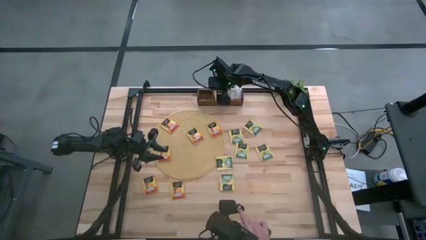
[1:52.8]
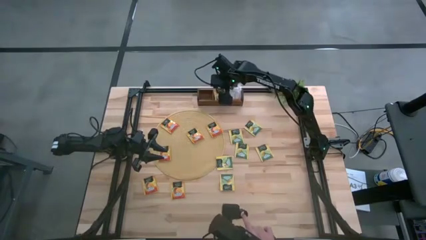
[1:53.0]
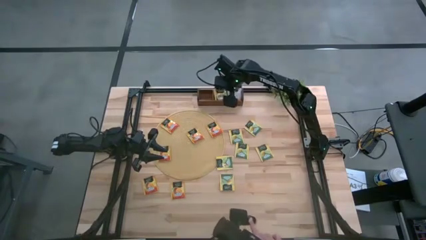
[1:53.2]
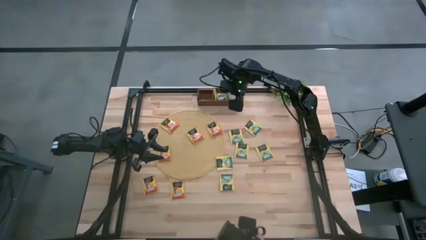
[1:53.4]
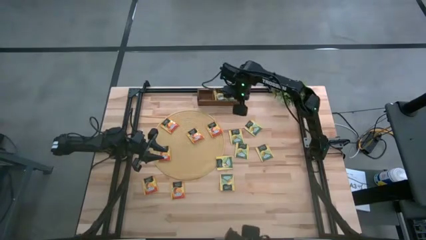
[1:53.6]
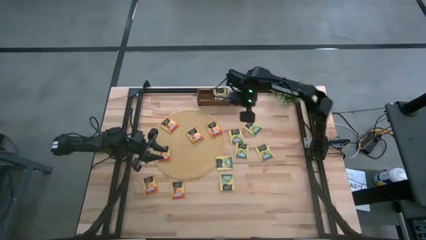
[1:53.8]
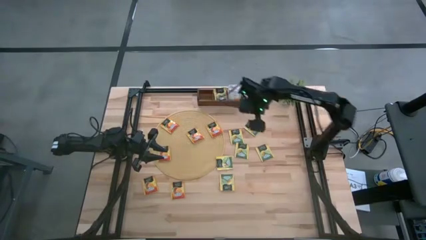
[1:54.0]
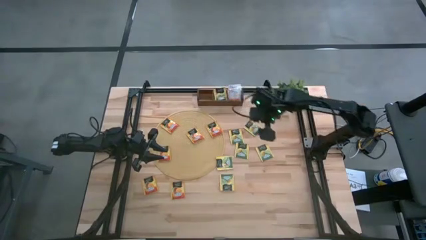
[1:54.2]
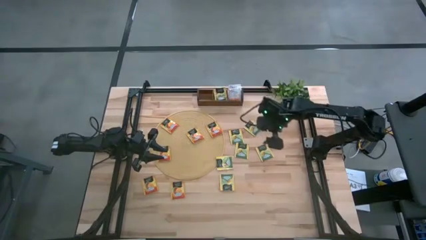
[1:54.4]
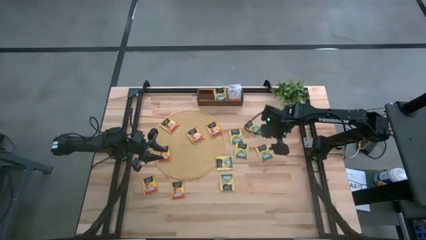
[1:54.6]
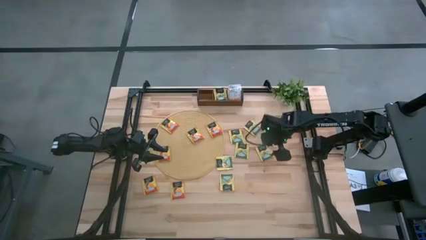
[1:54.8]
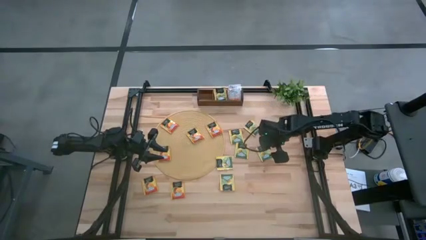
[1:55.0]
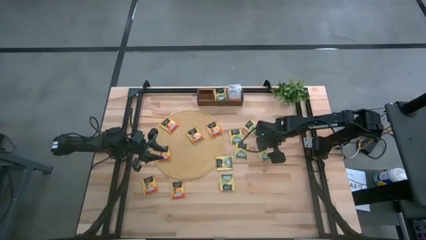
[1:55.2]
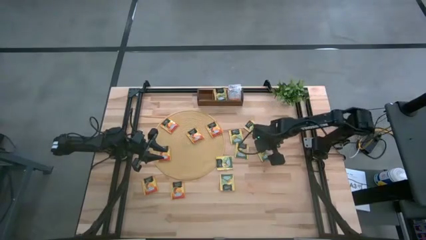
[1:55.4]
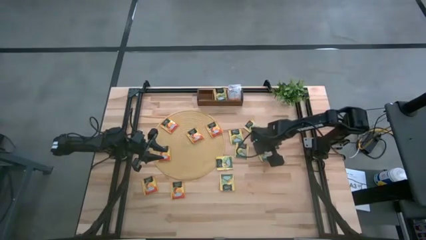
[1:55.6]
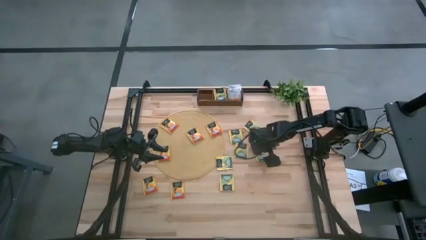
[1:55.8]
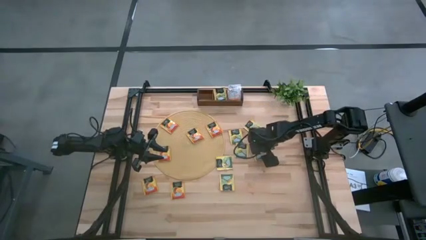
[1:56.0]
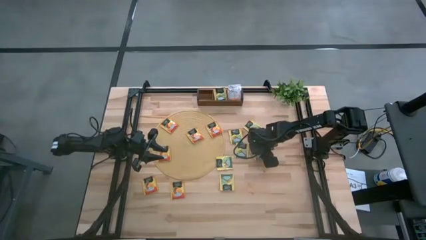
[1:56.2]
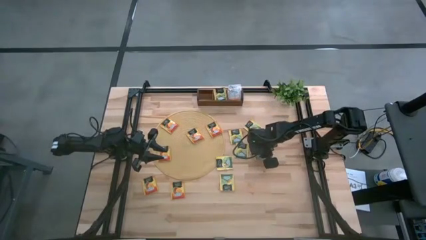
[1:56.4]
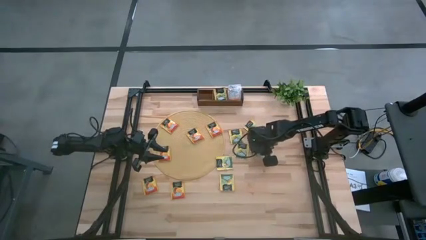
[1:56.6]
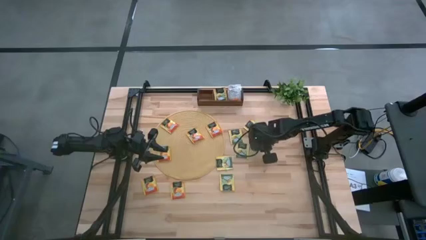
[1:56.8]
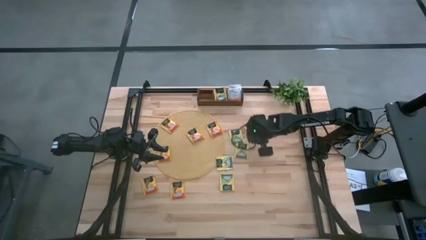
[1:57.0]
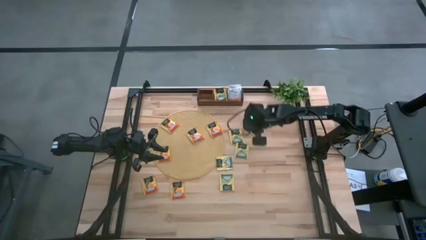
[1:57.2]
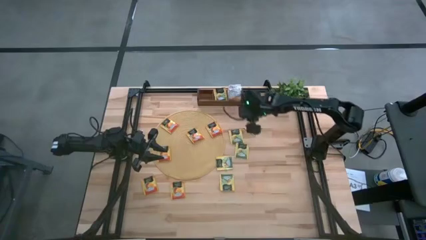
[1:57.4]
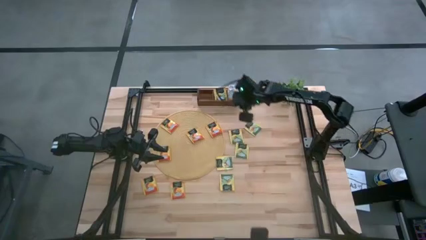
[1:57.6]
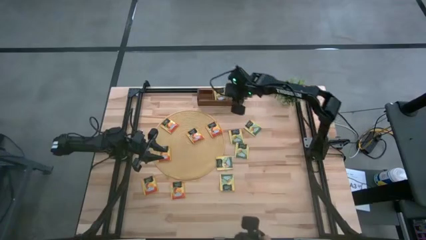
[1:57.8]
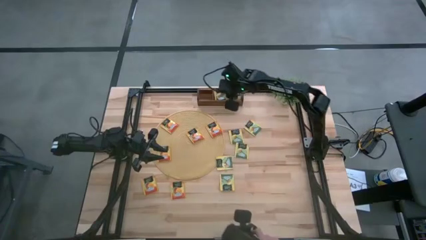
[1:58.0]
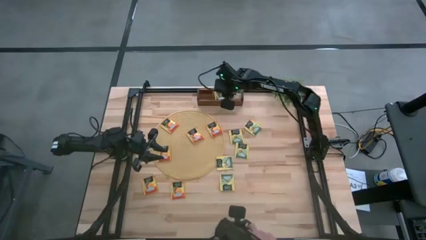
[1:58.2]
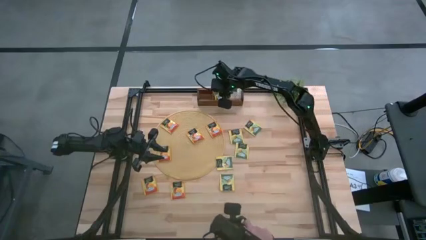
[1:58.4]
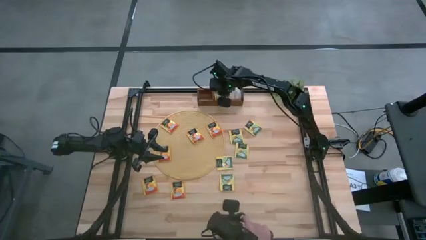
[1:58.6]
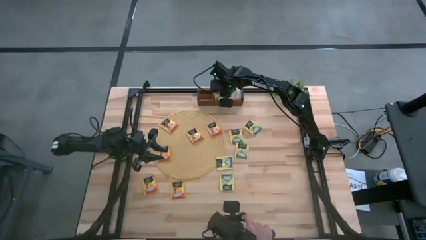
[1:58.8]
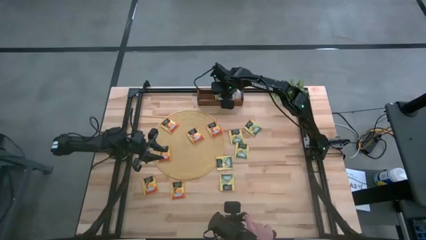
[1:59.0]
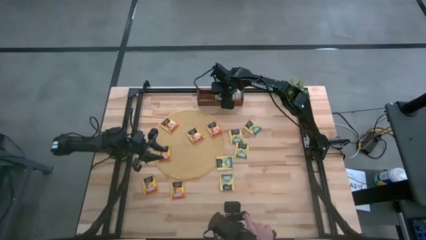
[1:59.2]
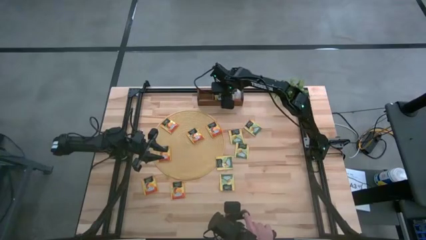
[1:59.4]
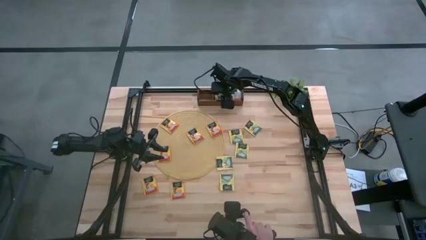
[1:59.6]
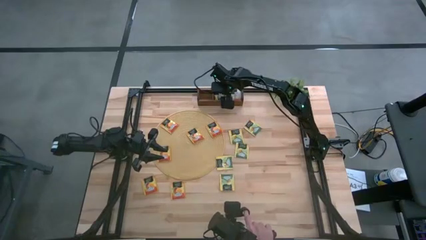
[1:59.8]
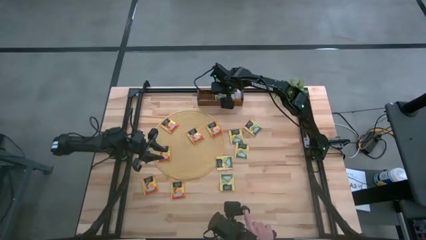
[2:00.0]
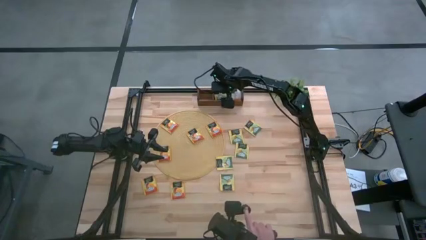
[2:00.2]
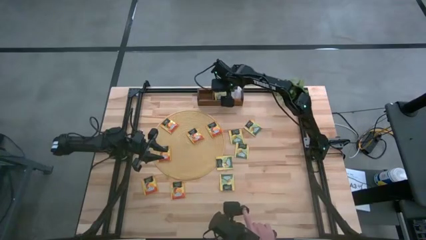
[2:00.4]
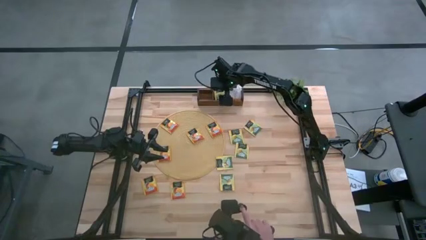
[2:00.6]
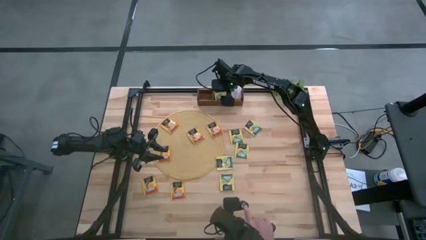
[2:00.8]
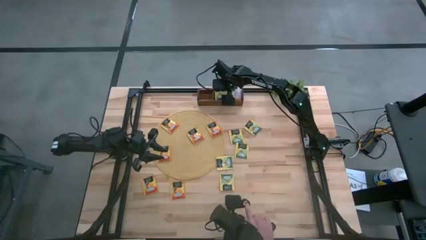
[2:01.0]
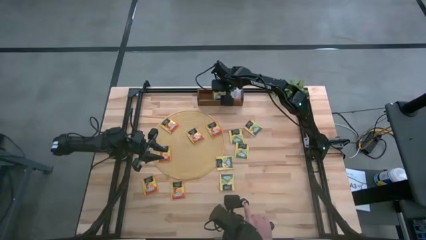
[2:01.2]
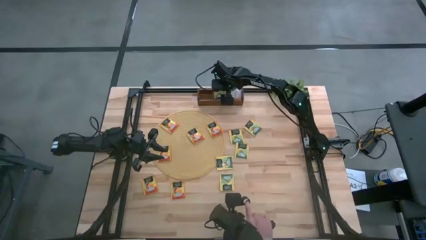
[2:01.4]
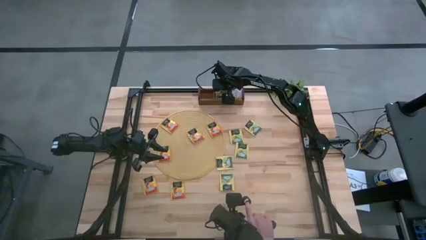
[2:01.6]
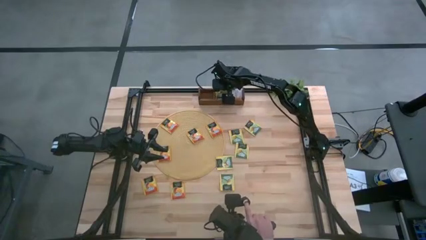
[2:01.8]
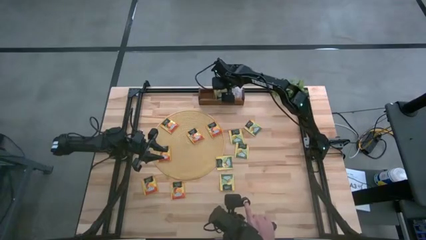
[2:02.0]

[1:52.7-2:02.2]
Task: Pick & Place Tea
Put the yellow tea bag into the middle section of the wooden organizer

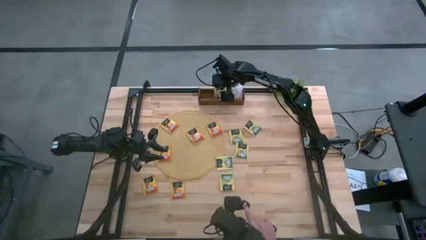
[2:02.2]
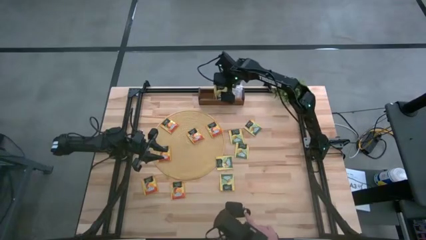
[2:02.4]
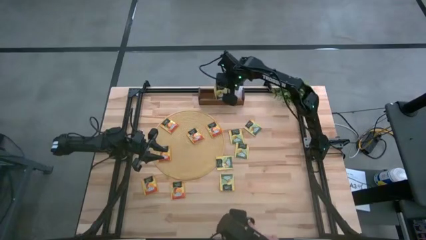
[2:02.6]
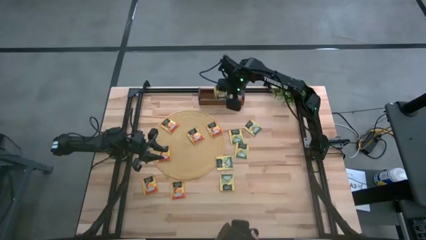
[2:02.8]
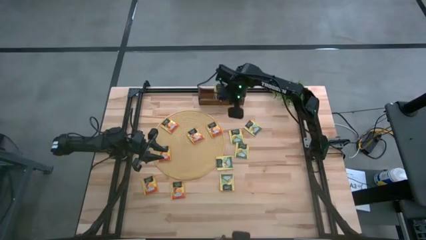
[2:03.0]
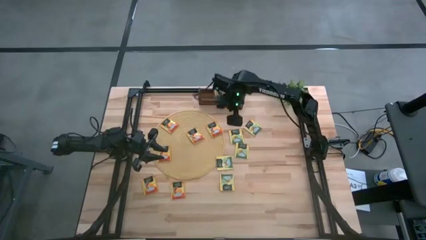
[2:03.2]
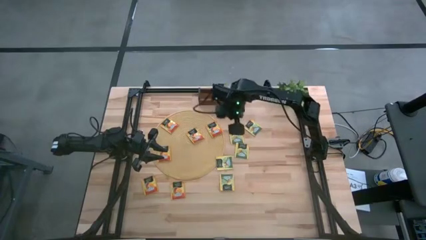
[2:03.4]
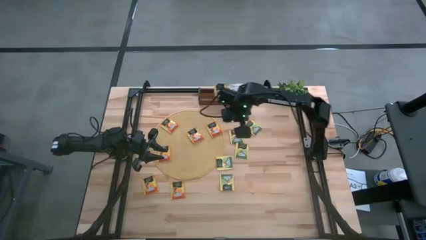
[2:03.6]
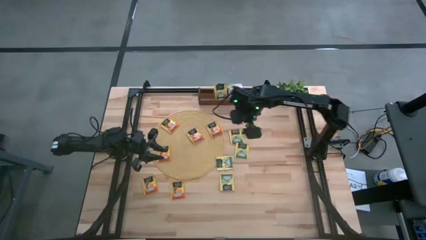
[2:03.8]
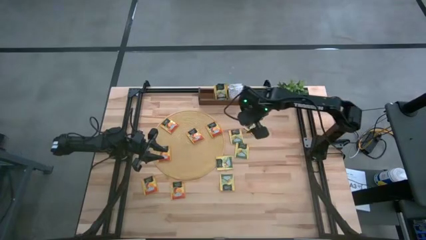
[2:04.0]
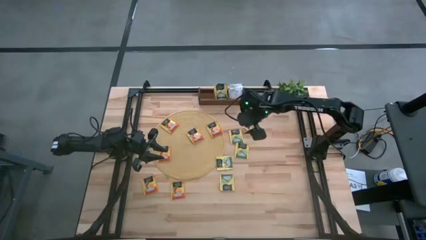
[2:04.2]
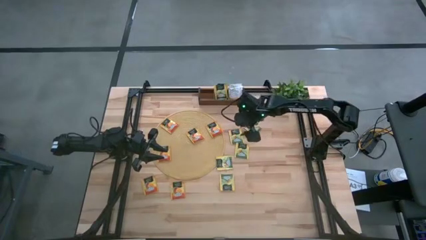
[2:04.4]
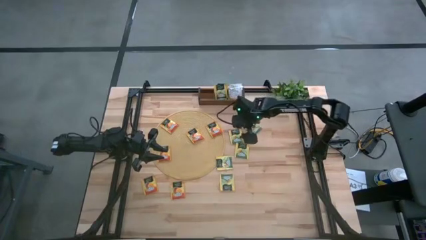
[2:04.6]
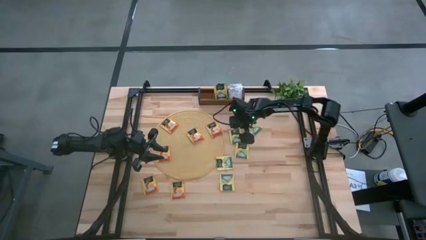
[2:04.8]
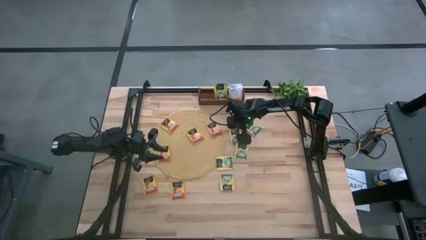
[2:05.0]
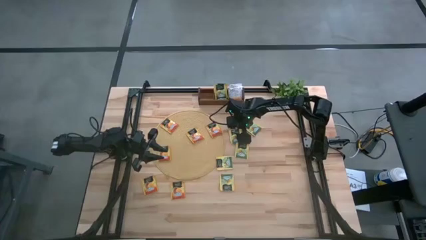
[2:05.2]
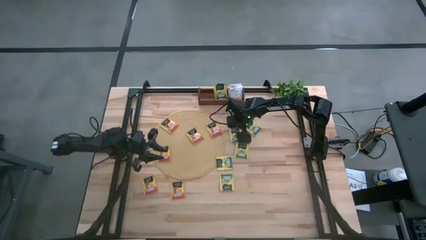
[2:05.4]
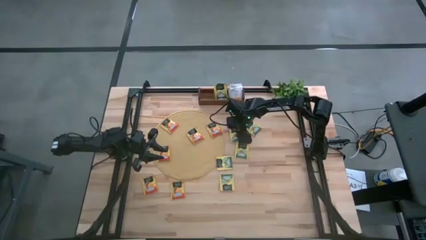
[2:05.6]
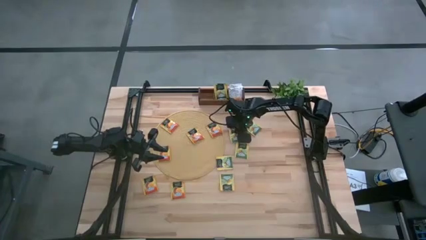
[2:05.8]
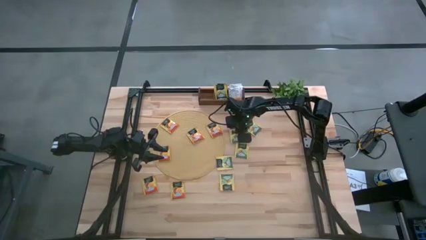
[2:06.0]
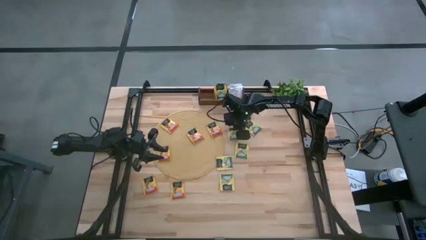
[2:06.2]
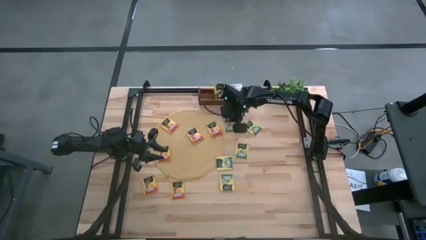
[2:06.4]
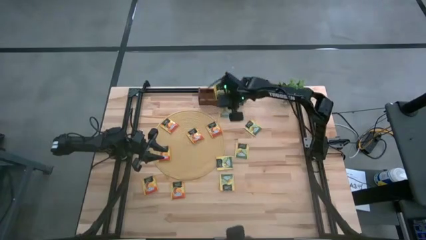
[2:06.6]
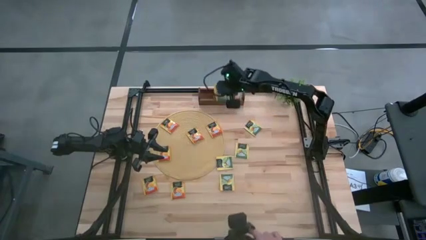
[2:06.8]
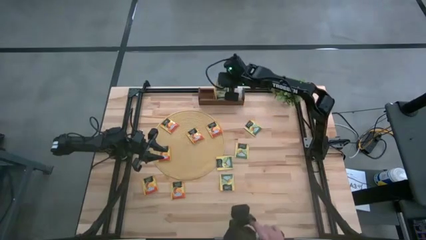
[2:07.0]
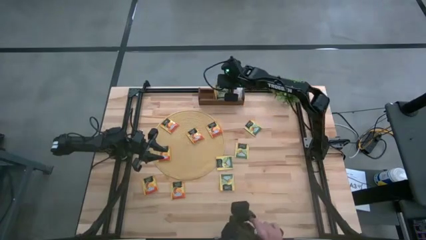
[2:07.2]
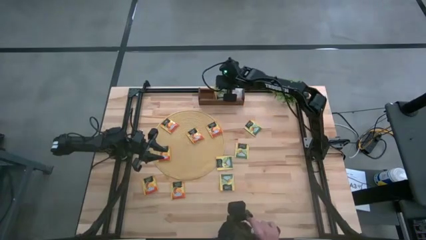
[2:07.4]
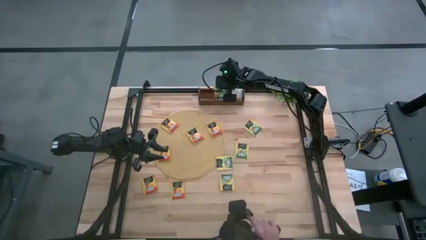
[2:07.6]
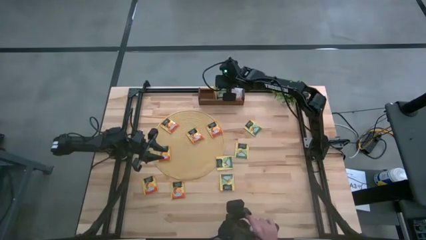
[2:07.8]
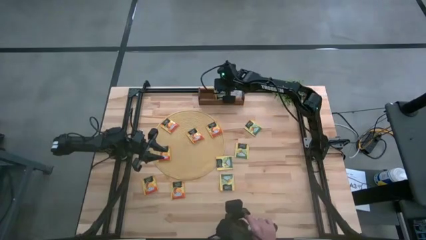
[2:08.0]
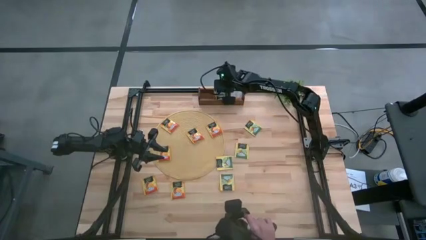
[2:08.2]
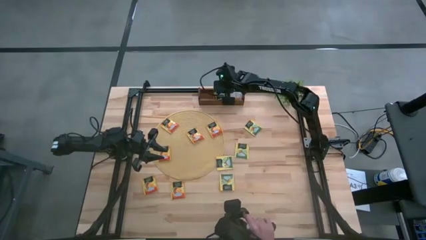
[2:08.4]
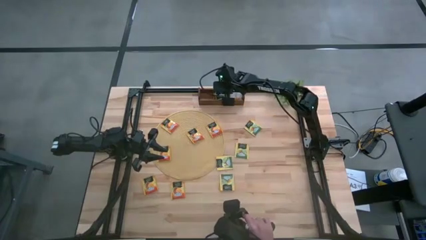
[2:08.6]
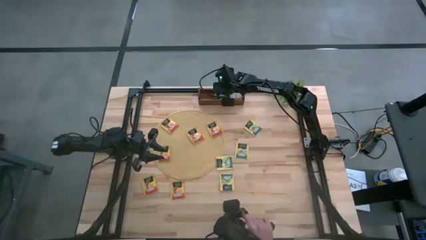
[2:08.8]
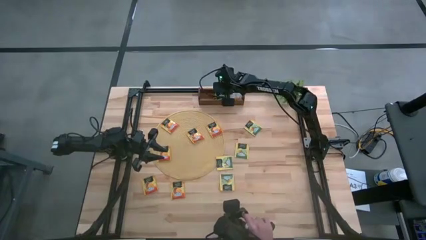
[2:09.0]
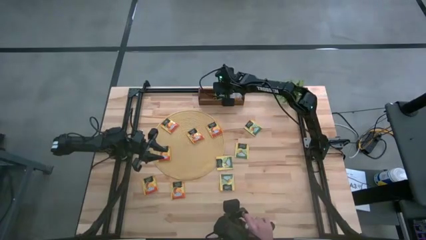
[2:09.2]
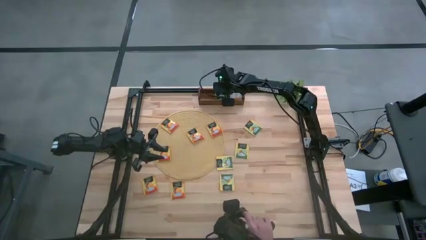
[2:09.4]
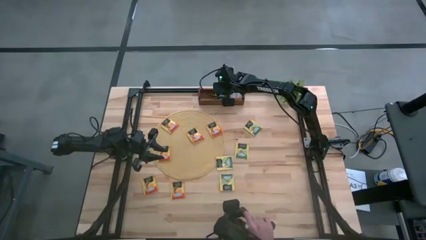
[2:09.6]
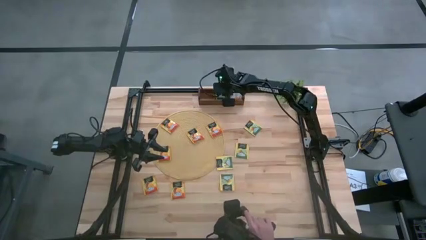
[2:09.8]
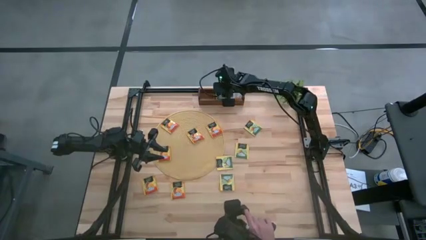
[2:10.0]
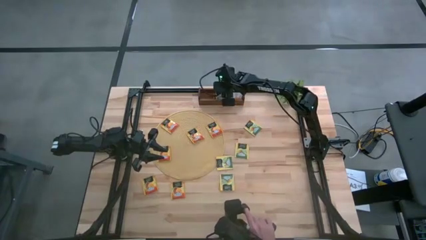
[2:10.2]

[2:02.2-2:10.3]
Put the yellow tea bag into the middle section of the wooden organizer

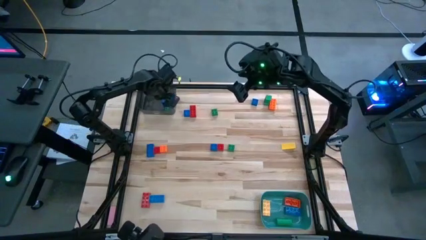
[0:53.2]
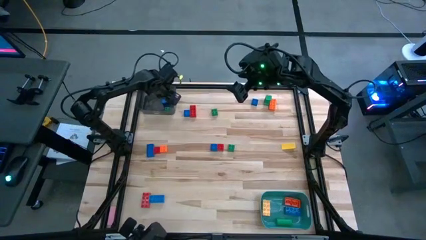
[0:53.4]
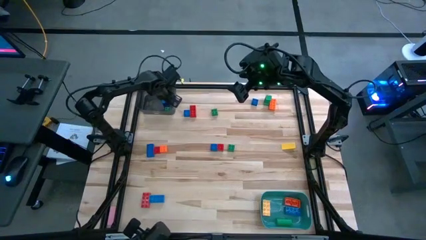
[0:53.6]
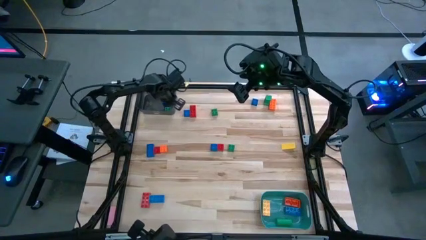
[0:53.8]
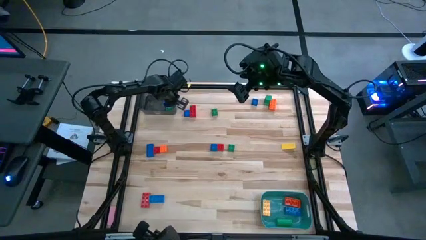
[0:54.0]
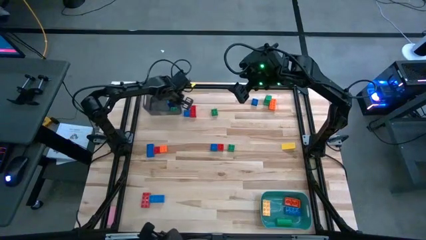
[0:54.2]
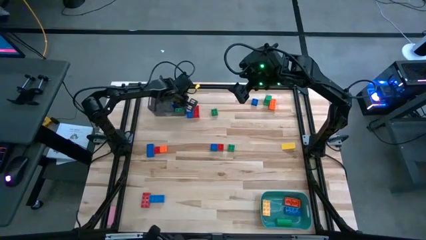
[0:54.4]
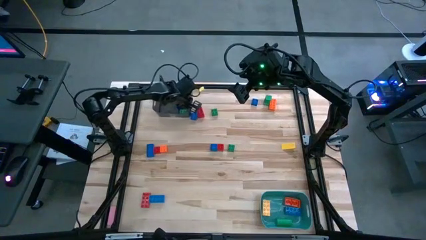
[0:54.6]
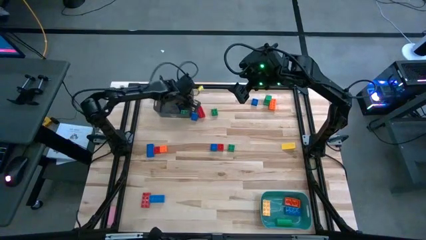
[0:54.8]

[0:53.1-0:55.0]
Task: Sort blocks by size
Adjust the black bin
